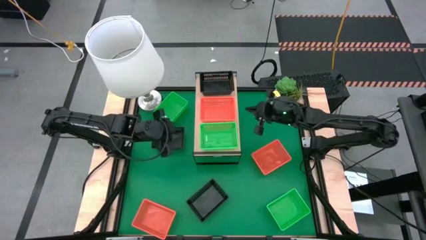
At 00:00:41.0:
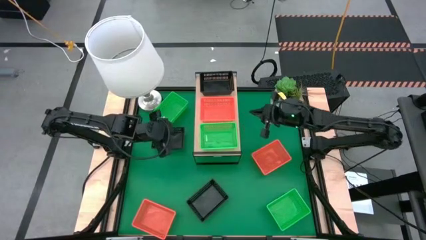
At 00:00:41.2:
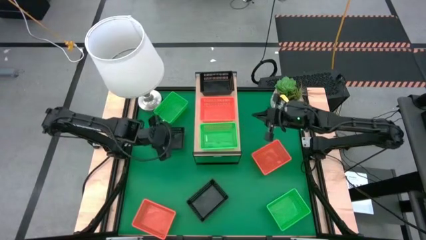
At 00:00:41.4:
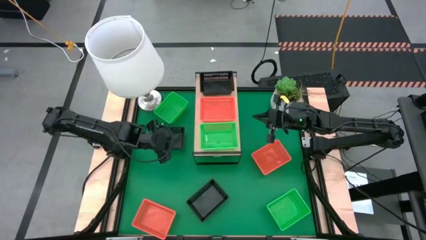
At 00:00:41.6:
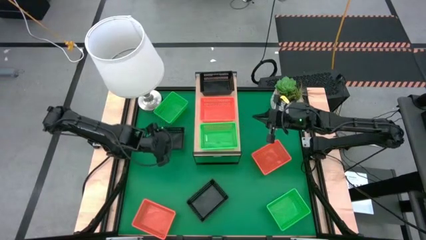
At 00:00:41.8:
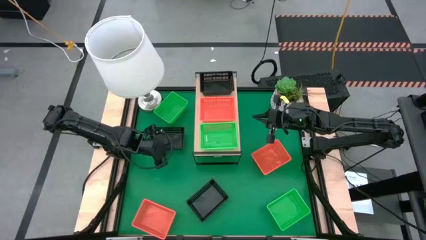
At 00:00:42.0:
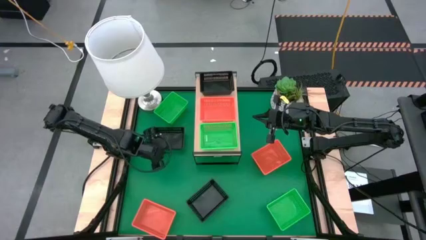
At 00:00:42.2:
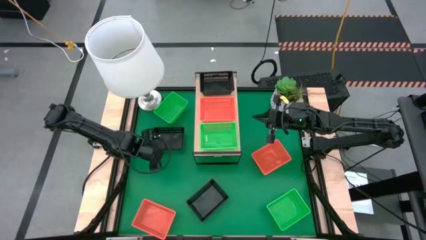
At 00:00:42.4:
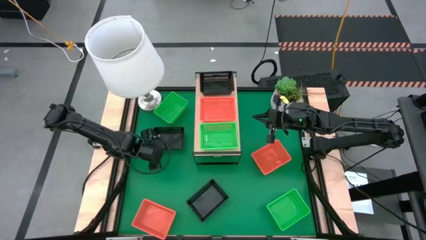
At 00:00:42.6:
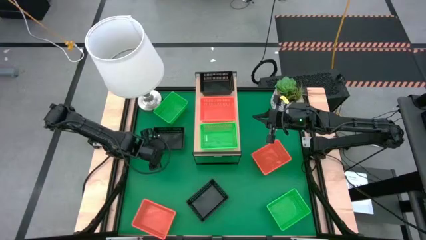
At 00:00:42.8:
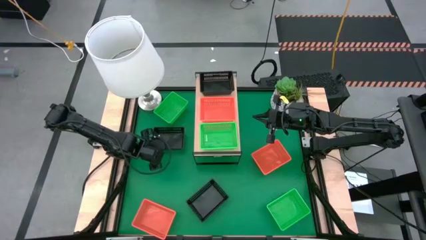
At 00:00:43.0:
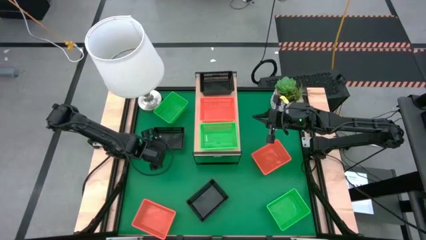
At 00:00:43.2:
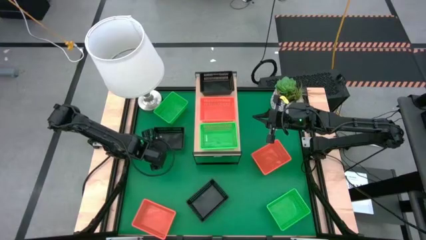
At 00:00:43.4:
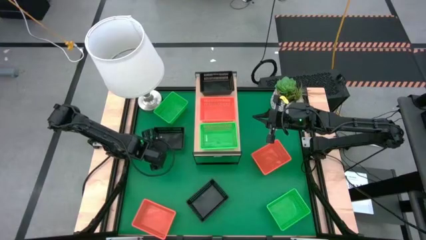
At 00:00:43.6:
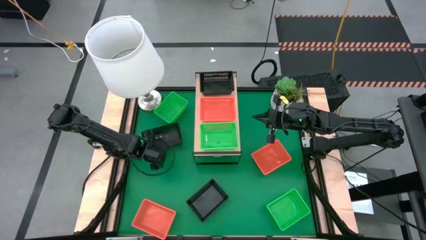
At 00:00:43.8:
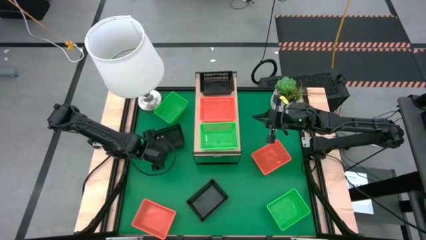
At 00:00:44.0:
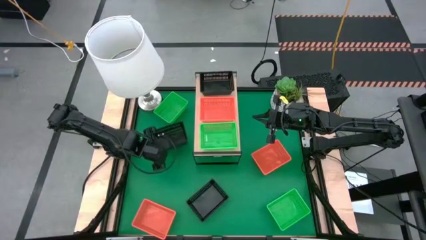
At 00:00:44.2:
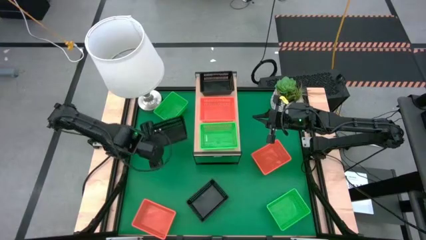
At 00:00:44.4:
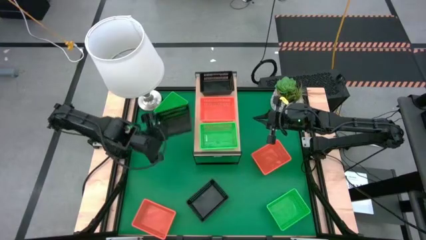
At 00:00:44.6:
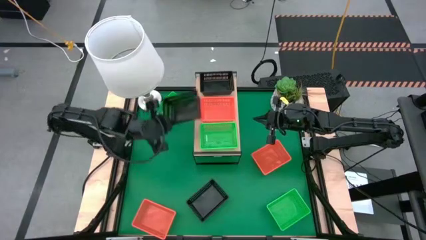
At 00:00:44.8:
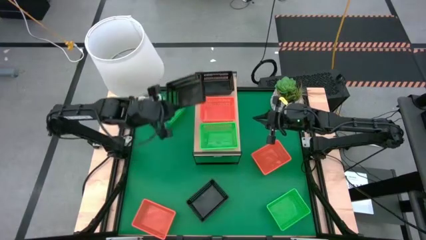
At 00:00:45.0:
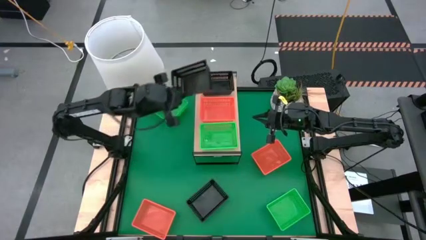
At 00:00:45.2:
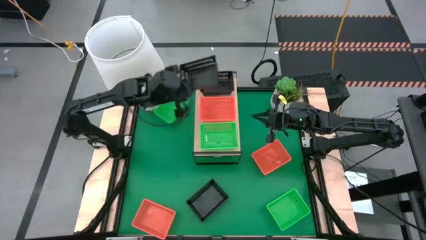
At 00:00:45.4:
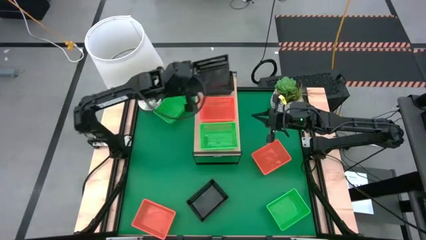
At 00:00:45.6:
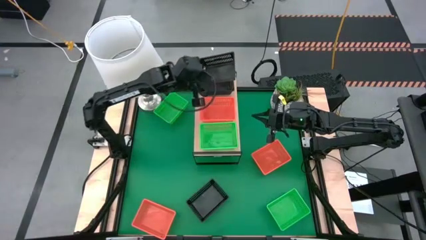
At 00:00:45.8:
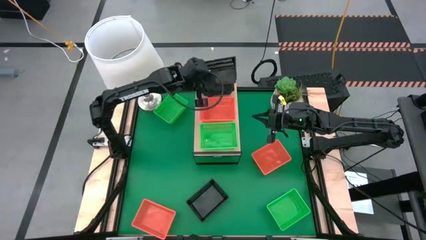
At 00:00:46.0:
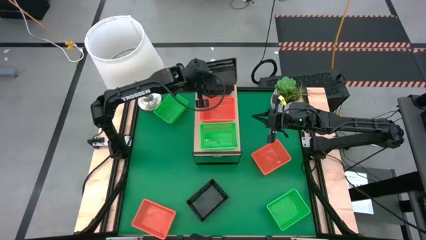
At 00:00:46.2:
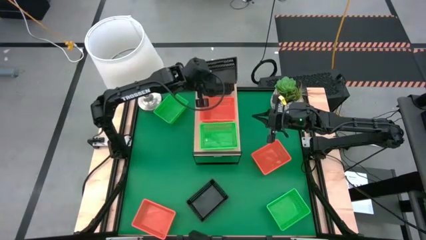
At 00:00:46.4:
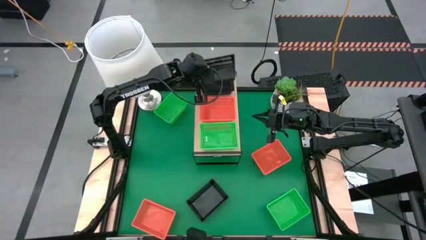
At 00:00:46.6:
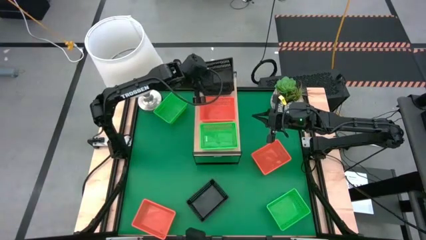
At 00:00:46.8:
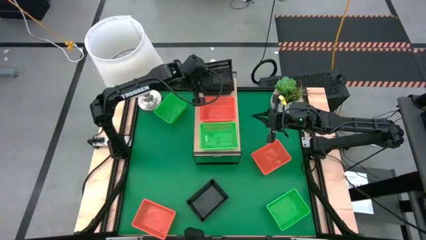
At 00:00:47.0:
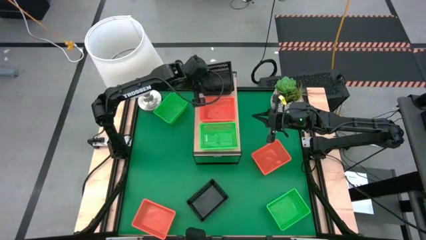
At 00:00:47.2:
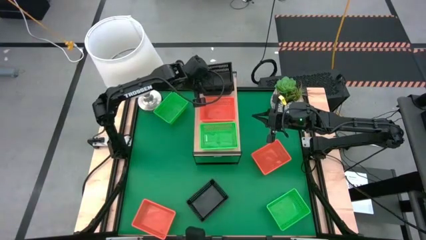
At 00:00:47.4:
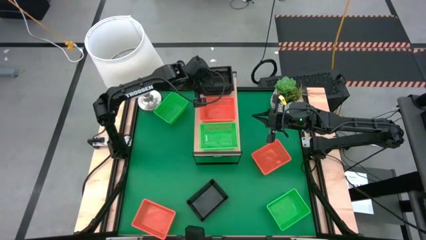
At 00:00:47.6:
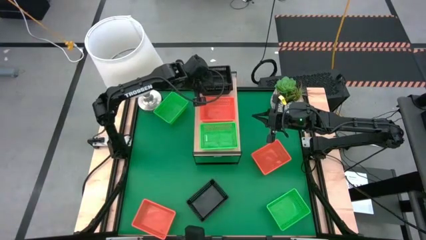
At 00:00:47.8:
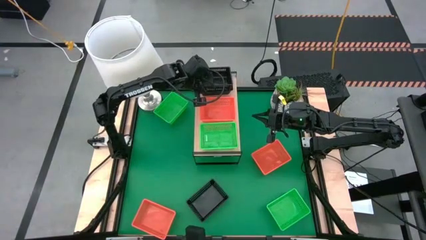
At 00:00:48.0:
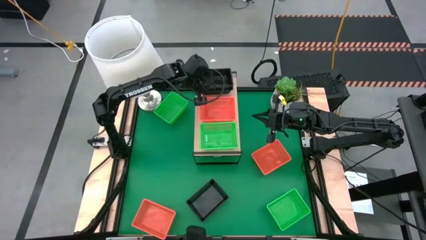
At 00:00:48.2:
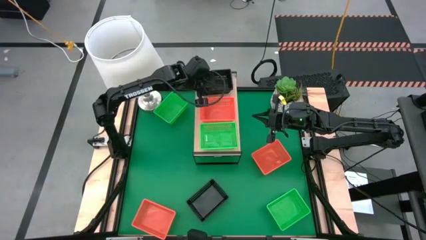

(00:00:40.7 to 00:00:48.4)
Task: Stack baskets on shelf by color
Stack the top black bin on top of the black bin on the shelf

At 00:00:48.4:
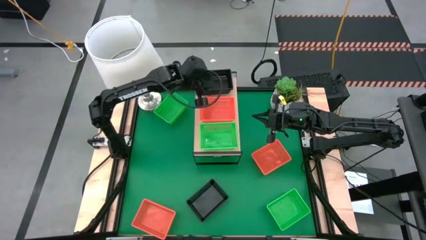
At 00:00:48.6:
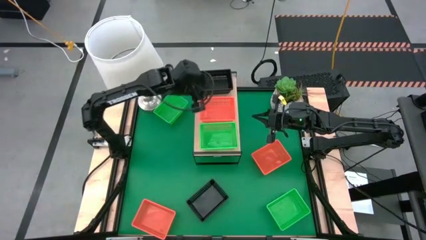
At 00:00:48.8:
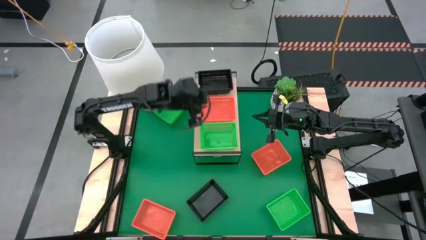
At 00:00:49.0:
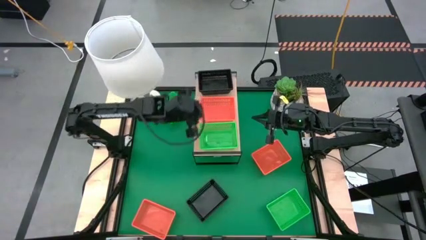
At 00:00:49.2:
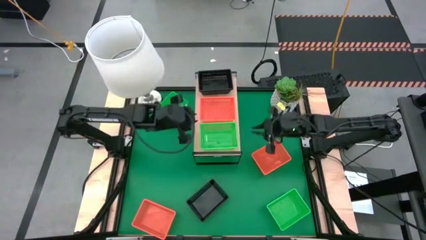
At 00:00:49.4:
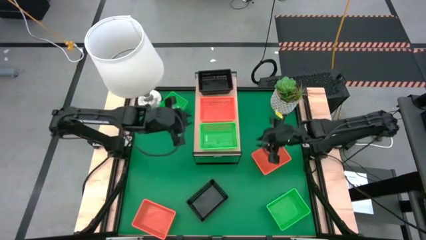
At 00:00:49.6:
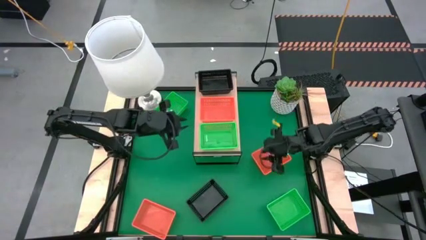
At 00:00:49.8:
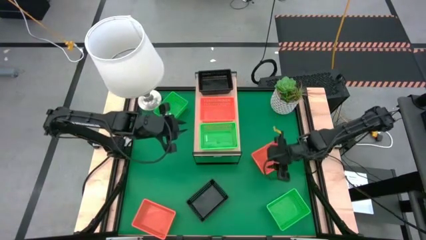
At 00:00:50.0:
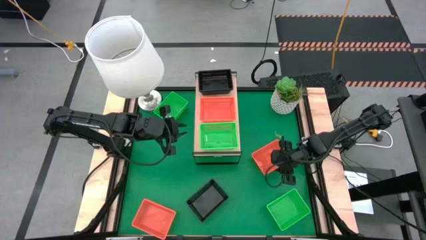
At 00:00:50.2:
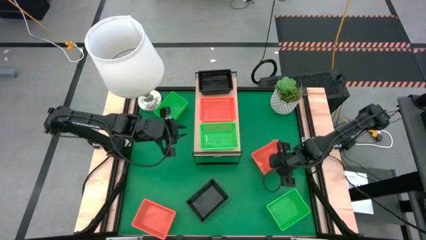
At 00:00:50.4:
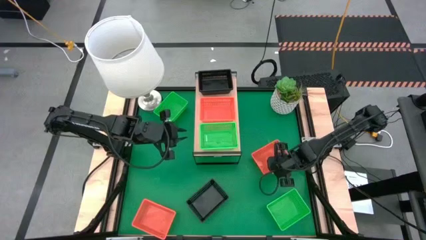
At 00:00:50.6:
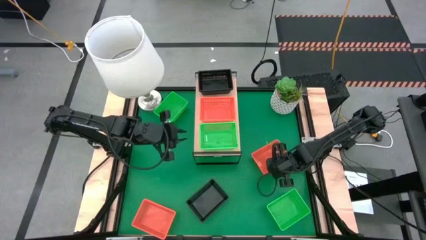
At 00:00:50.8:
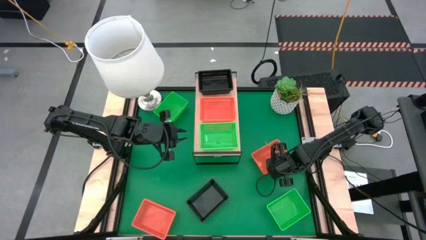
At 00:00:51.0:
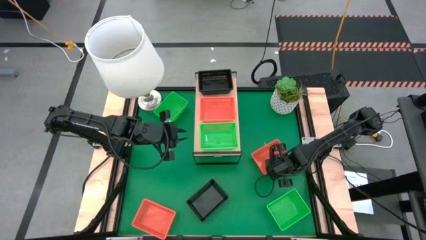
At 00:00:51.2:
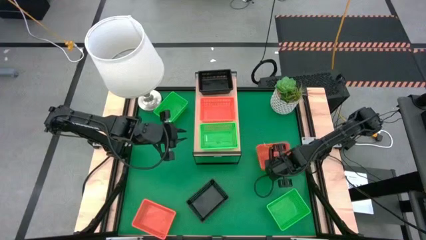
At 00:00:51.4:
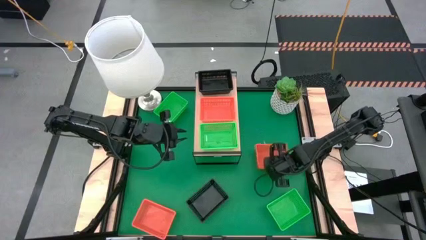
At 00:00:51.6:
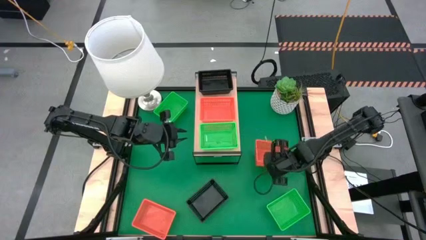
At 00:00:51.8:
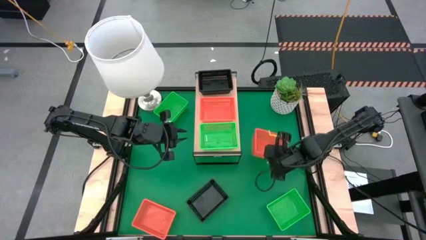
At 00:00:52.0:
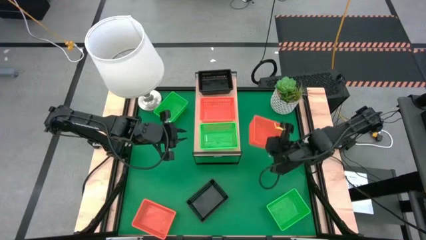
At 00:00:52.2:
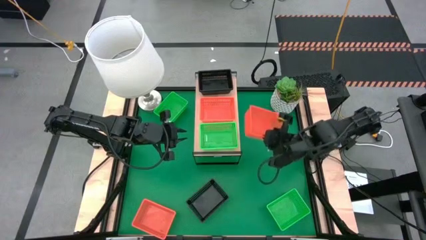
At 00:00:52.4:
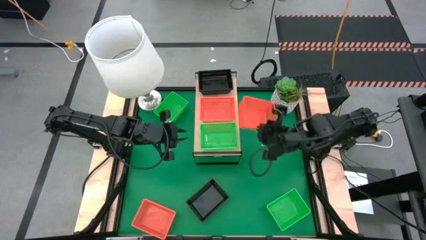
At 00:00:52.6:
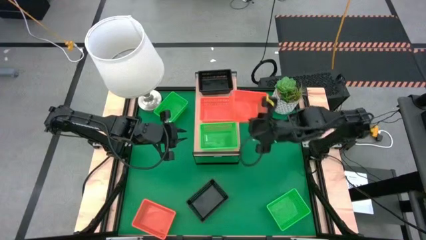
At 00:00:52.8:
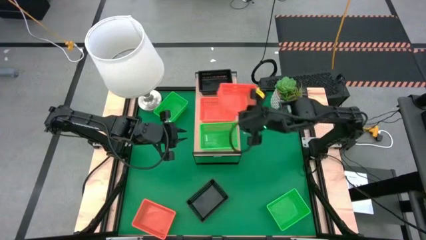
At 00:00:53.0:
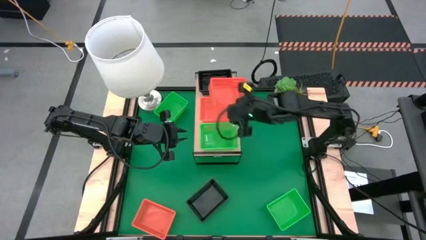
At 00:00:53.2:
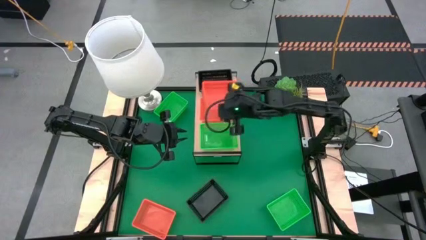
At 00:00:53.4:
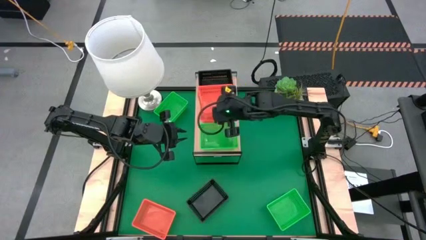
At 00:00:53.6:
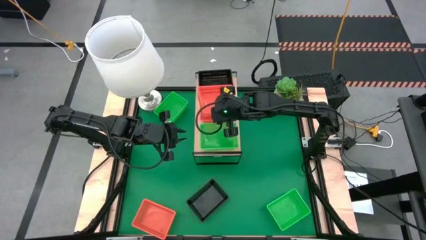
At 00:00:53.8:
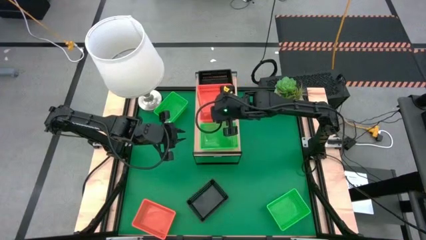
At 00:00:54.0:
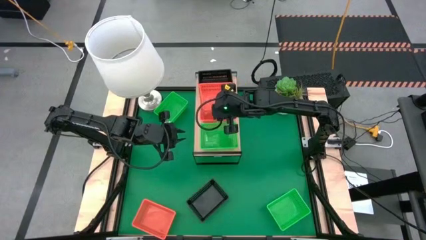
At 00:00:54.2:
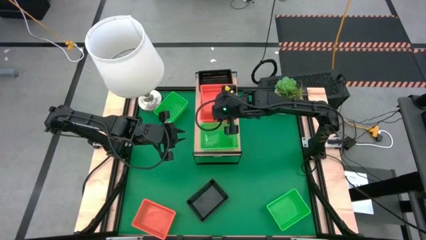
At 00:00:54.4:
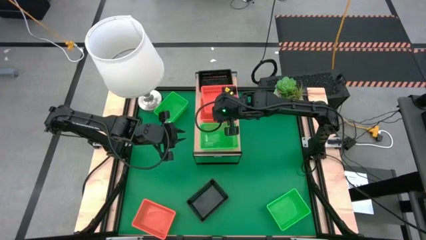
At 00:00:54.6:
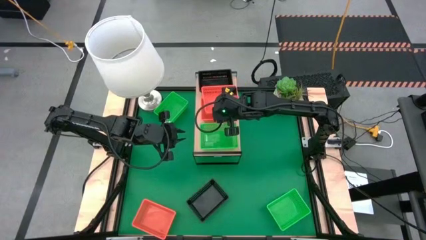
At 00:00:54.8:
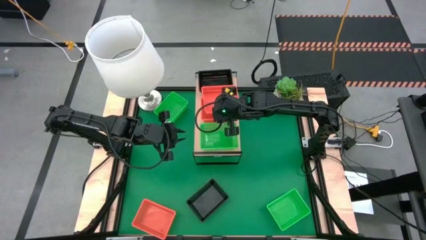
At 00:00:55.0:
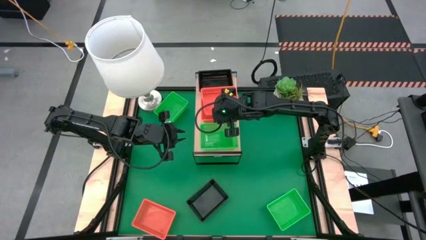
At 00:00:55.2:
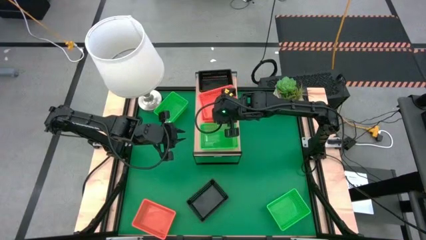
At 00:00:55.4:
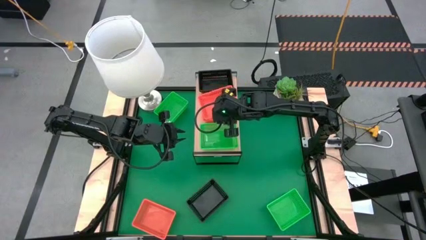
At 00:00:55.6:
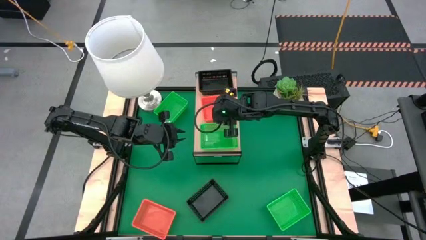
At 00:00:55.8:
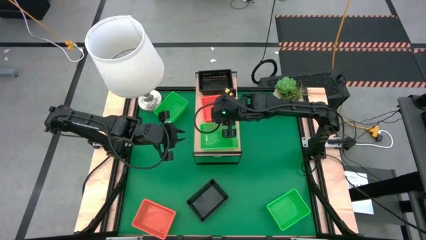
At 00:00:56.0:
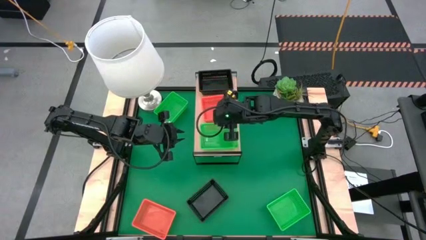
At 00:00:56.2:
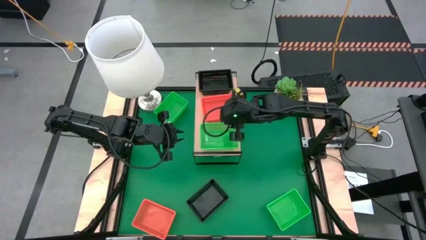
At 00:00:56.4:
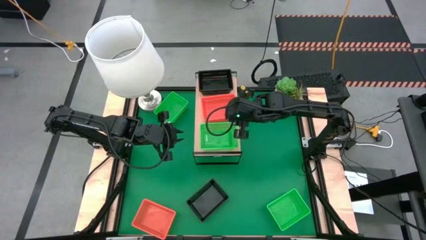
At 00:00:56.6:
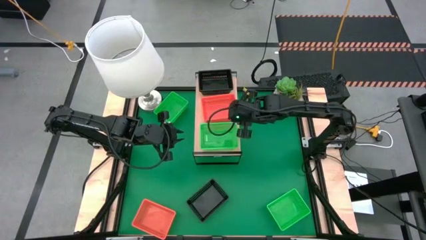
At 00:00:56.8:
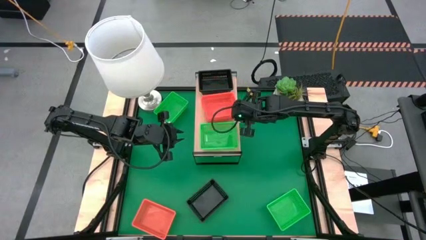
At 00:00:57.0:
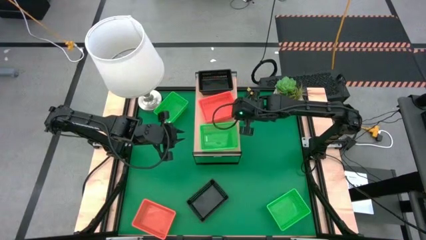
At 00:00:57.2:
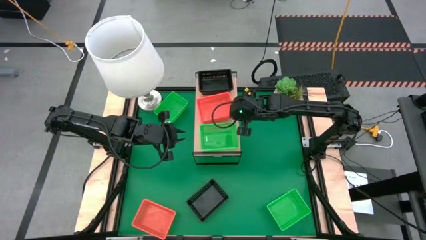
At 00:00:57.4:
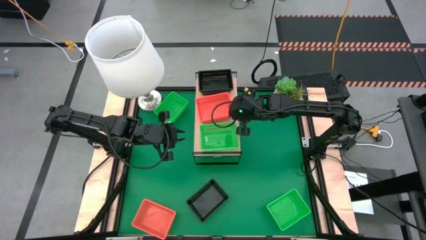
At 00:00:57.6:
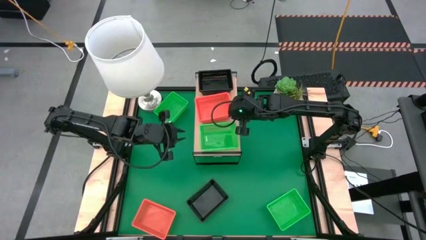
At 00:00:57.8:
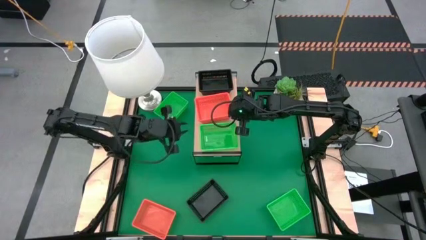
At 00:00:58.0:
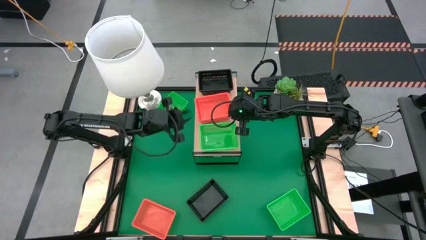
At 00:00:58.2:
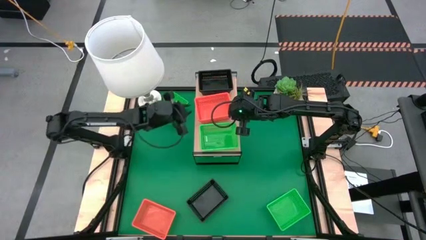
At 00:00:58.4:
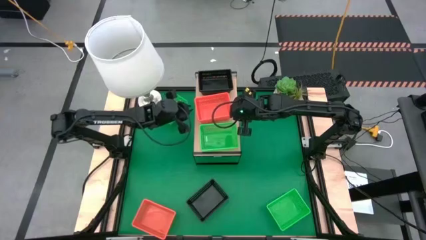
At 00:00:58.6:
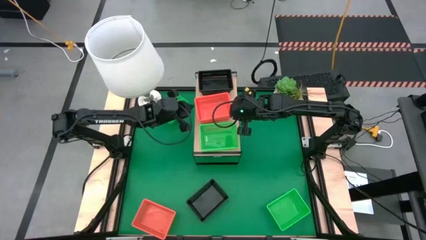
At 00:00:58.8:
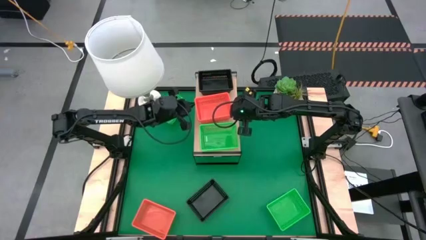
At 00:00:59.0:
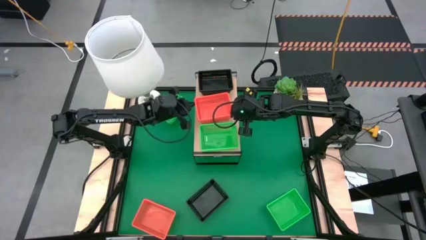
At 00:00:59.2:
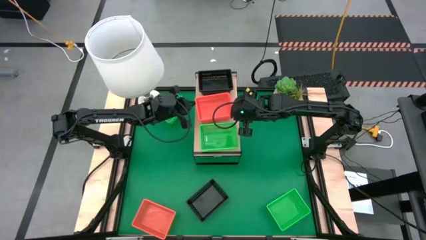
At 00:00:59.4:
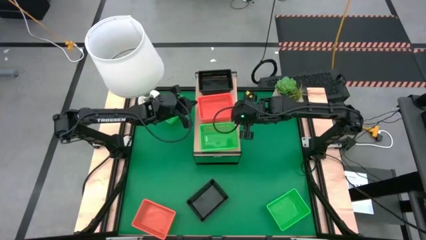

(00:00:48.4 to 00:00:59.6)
Stack the top orange bin on top of the orange bin on the shelf
